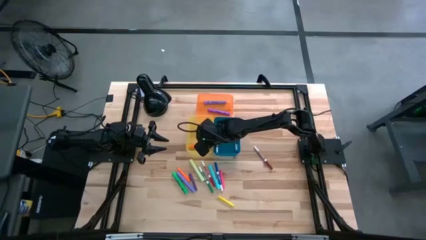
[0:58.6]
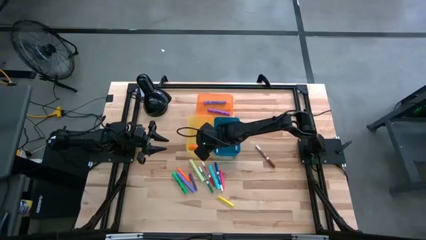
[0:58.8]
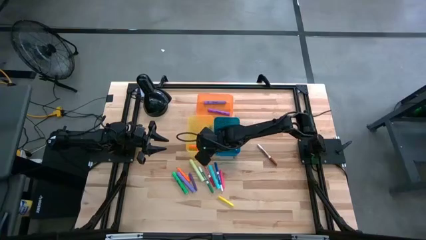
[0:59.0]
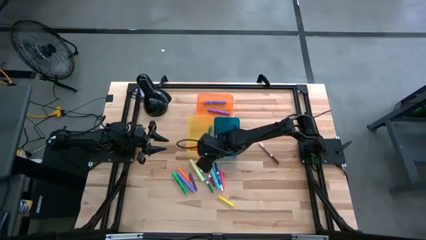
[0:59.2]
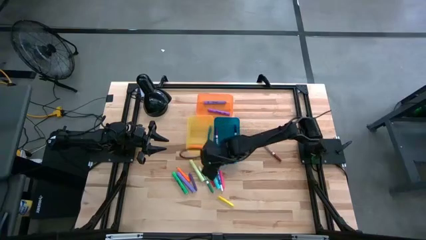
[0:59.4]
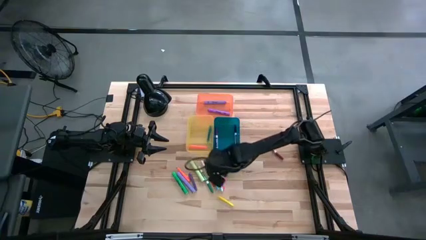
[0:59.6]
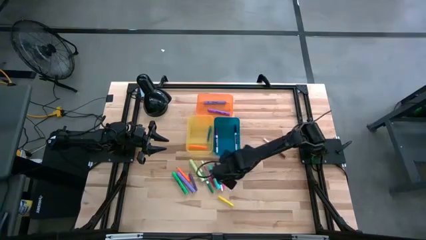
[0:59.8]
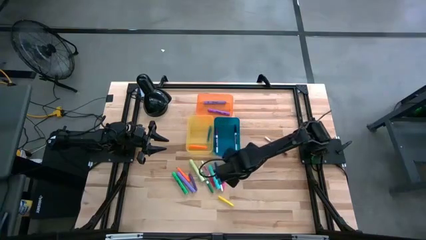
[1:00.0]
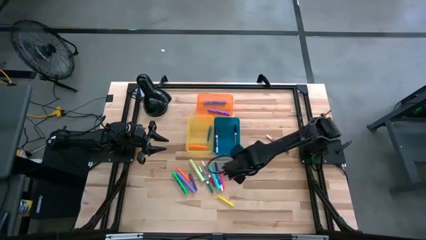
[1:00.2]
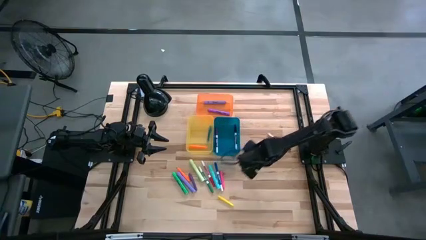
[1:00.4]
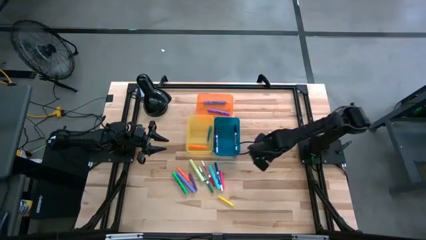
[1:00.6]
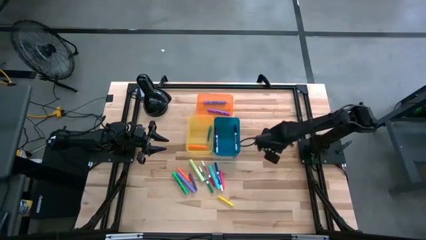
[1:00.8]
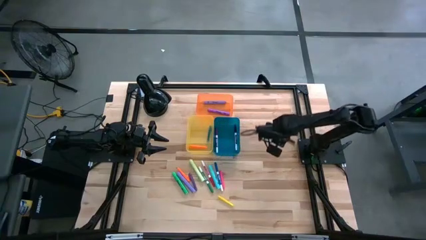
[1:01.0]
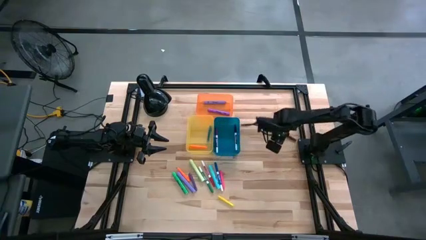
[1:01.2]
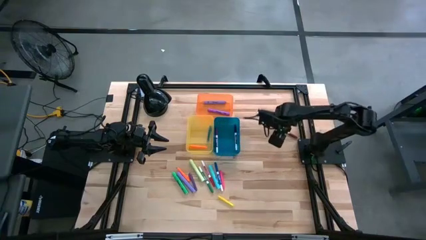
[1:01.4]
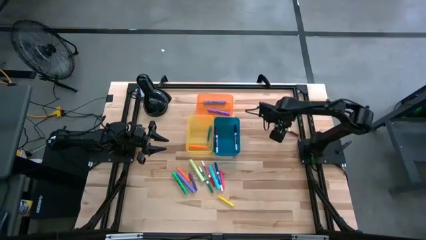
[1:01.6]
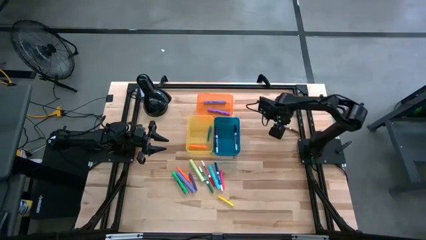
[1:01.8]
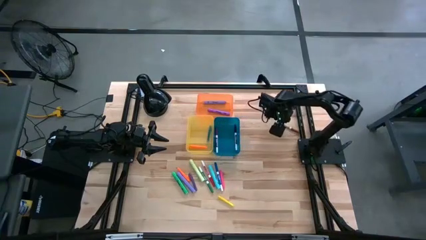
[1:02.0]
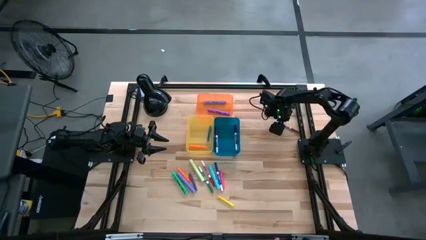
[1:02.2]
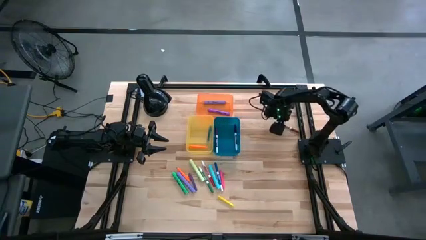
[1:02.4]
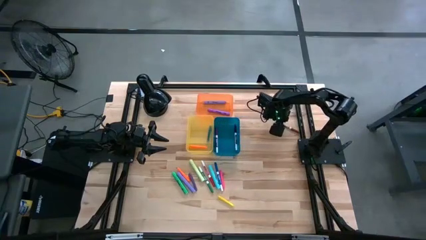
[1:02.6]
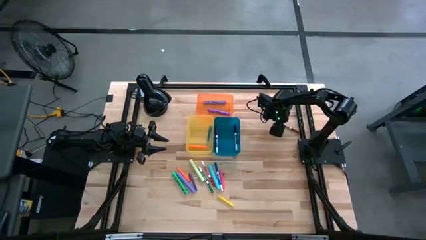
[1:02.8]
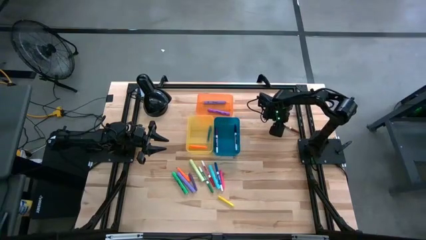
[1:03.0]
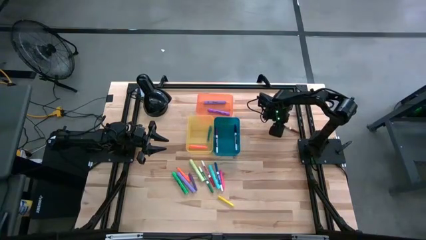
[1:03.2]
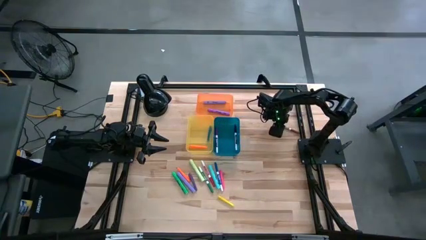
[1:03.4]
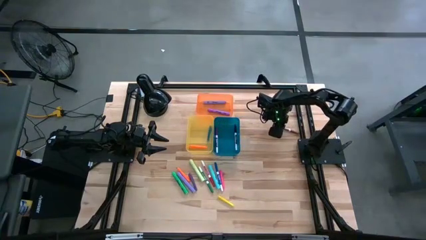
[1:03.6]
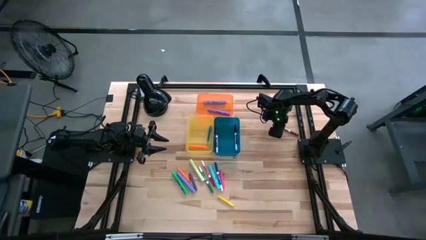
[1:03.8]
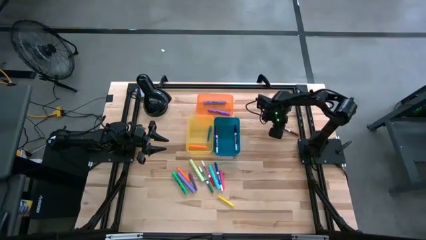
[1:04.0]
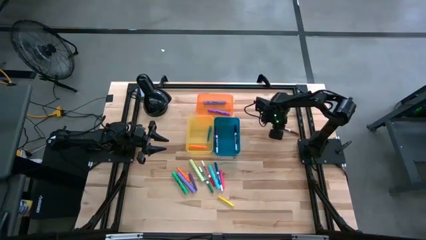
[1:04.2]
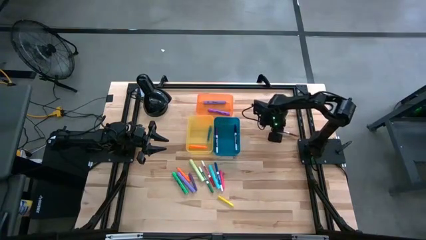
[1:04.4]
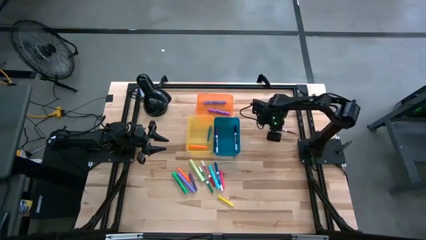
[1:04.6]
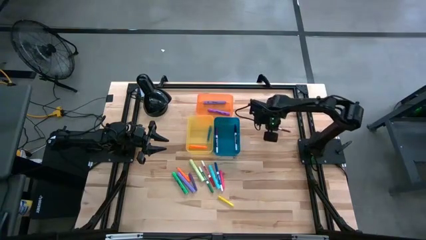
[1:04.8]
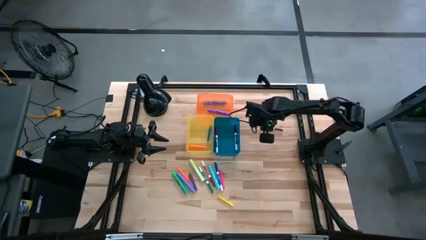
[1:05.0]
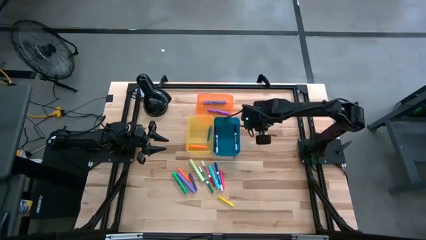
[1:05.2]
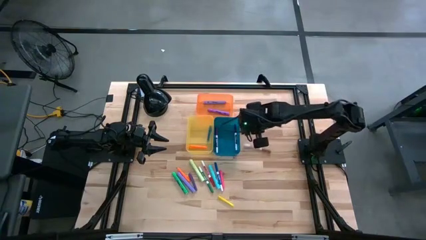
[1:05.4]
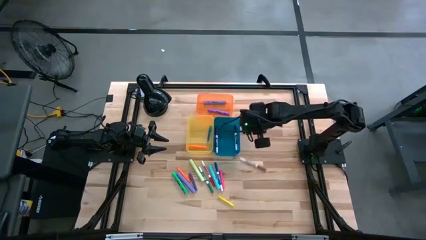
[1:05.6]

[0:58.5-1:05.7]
Task: Pick & Place Markers
Put the brown marker pen into the blue bin

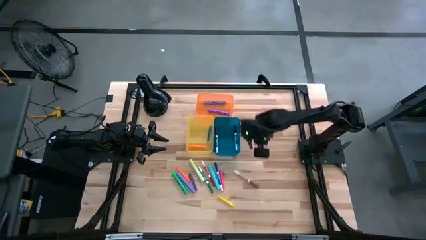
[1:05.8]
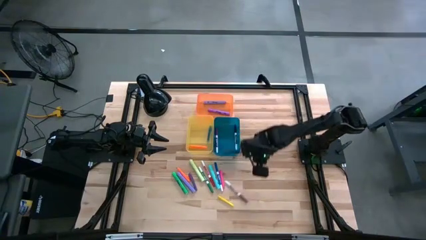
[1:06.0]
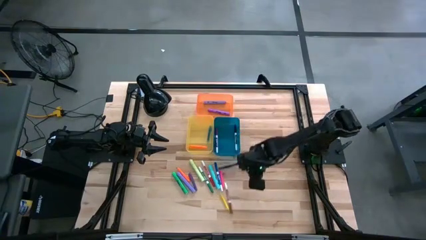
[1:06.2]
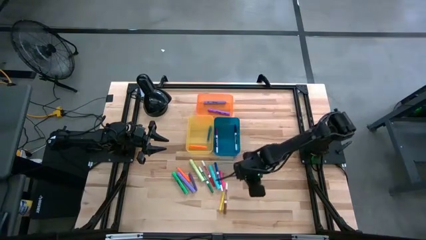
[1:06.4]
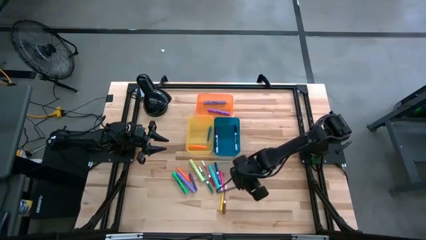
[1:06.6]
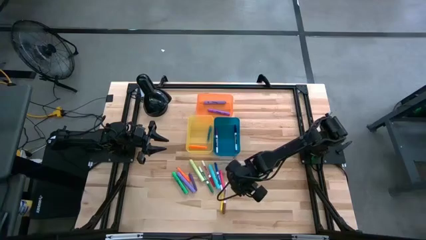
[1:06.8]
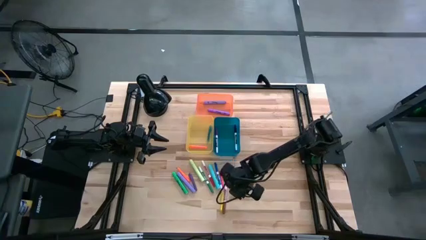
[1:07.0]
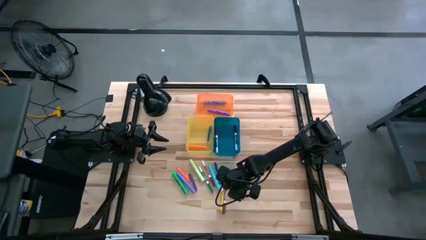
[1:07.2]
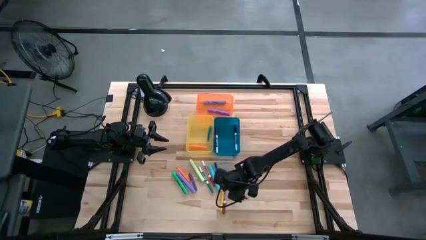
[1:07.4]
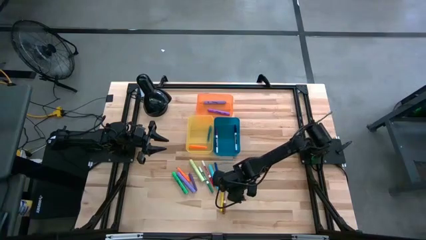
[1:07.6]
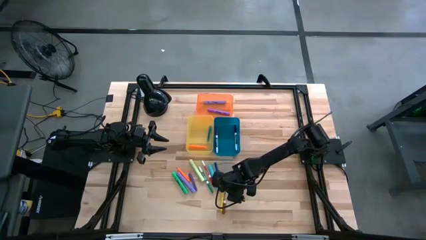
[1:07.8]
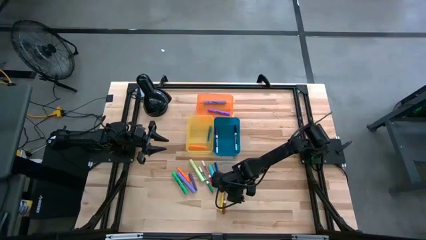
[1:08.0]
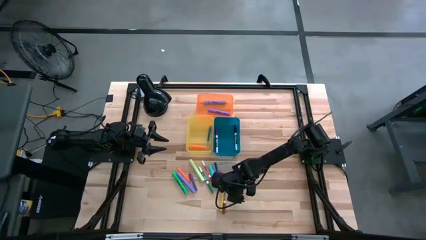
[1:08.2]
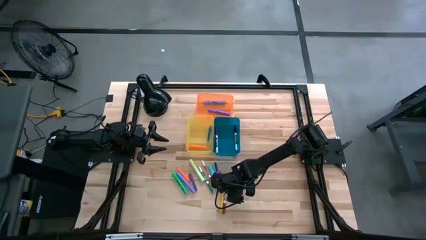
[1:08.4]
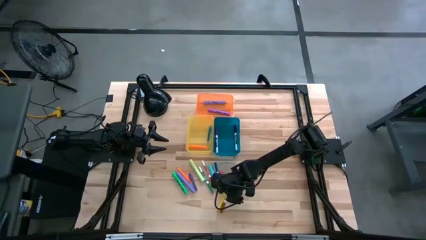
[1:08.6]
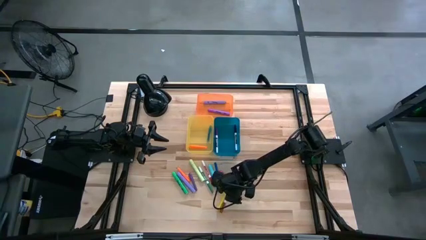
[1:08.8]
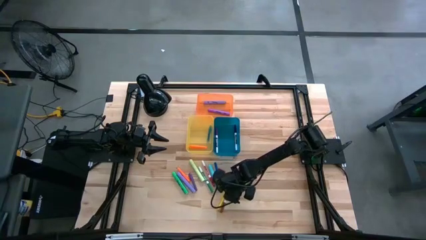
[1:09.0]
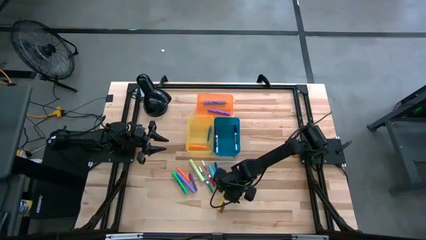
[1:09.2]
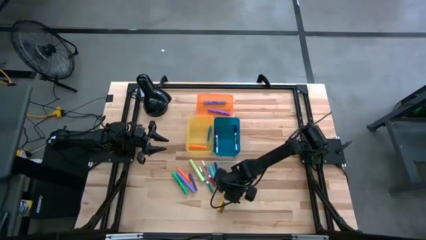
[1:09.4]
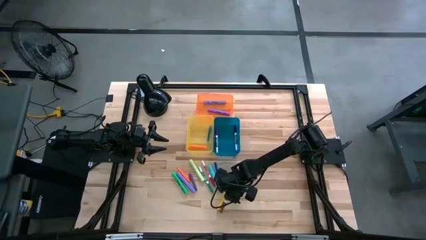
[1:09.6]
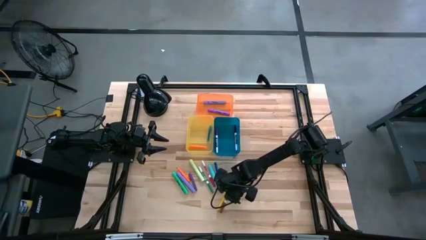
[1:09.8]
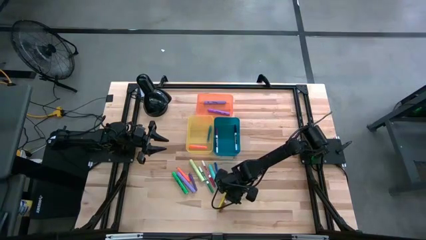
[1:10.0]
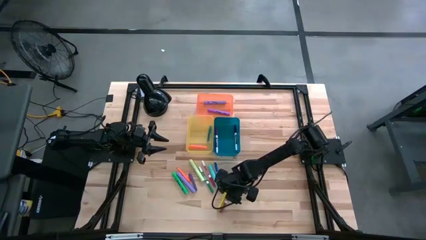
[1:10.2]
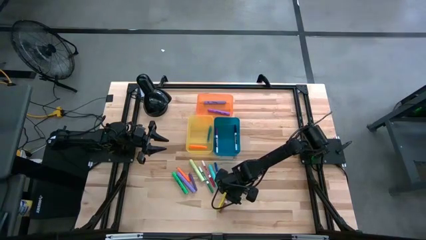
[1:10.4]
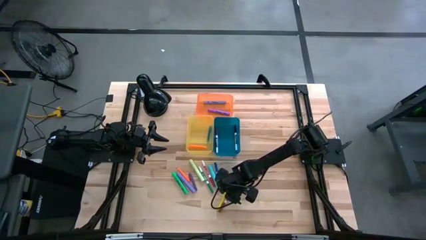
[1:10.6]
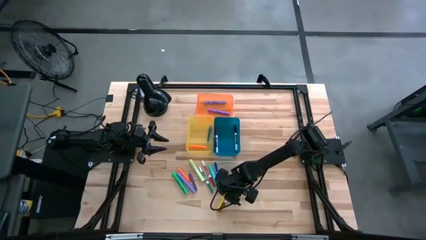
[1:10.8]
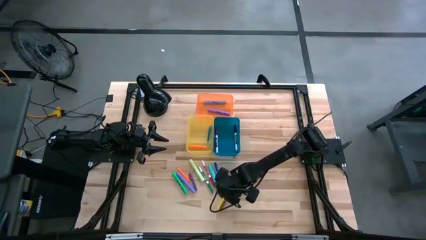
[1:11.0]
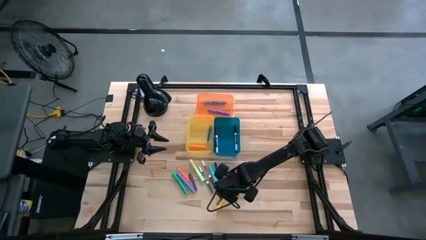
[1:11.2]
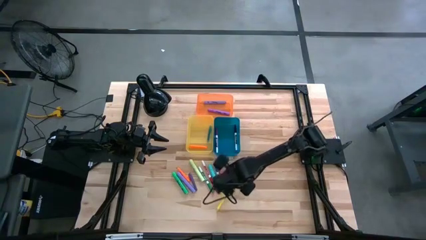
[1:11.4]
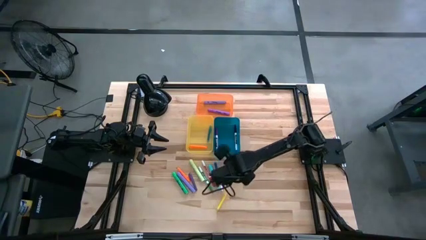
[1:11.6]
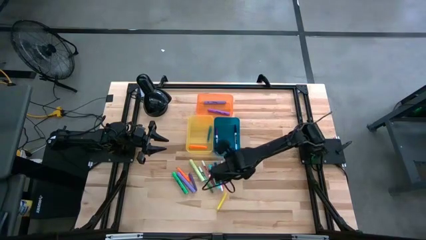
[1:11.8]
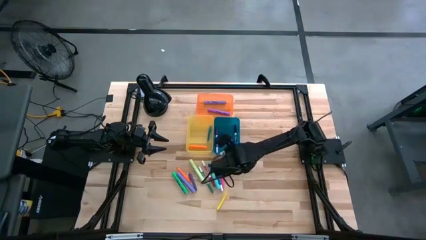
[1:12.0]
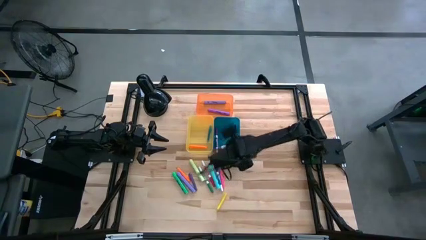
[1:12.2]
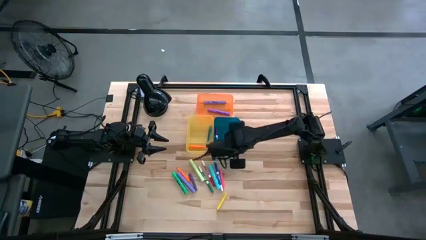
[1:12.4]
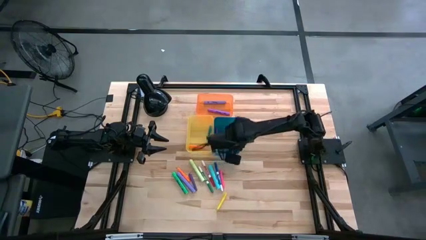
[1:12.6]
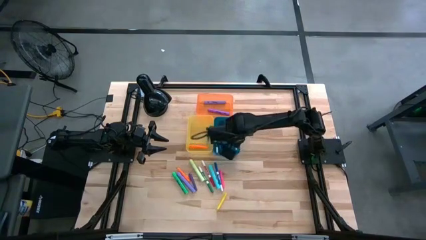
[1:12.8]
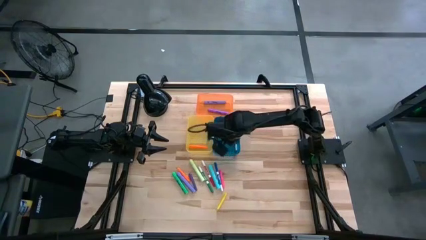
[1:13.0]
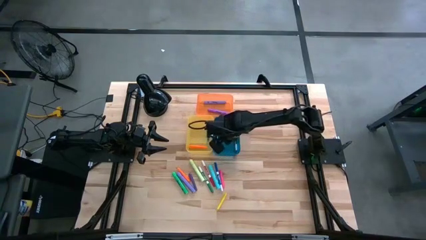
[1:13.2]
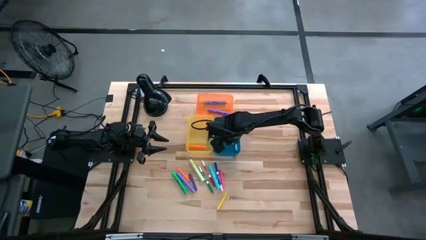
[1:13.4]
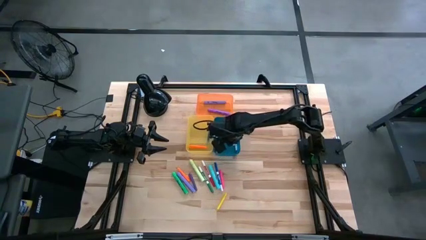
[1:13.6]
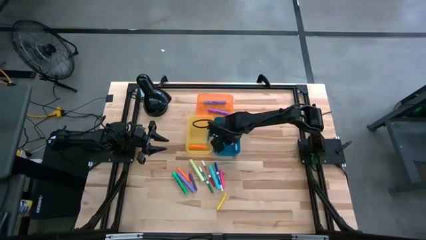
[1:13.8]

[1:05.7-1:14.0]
Put the brown marker pen into the blue bin
